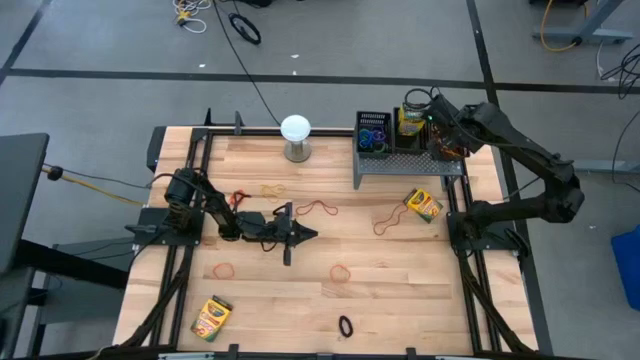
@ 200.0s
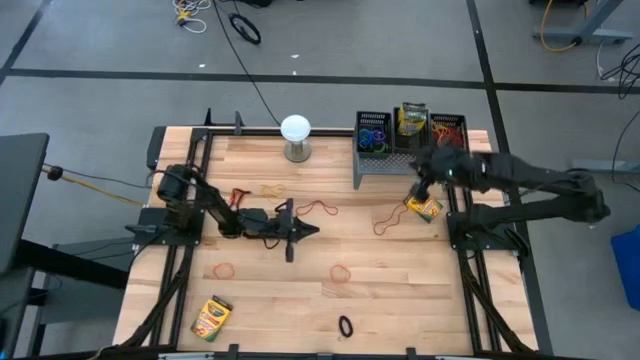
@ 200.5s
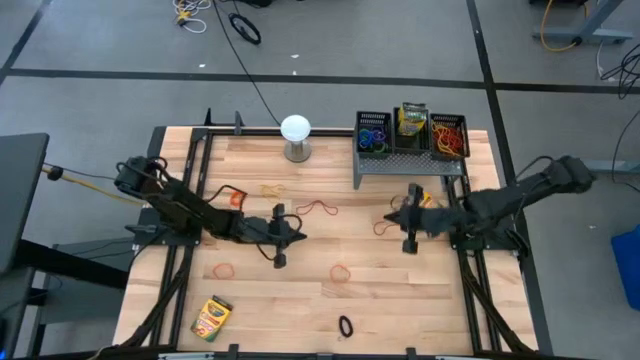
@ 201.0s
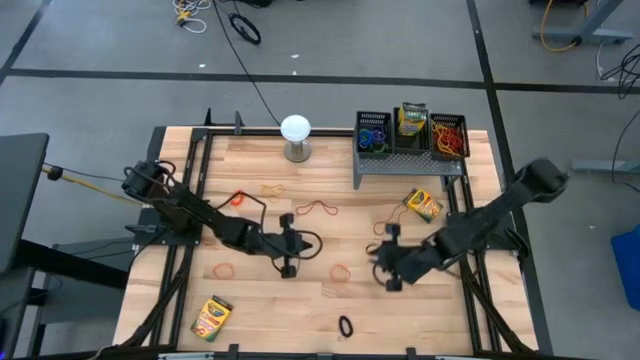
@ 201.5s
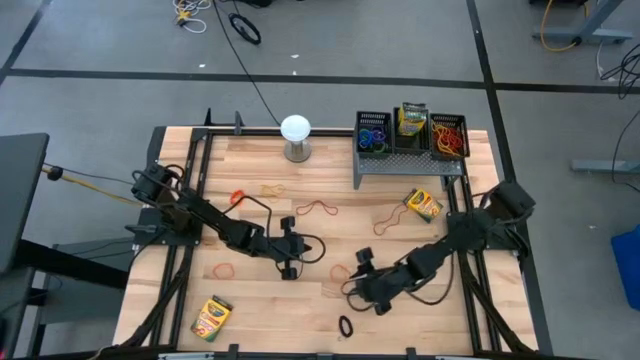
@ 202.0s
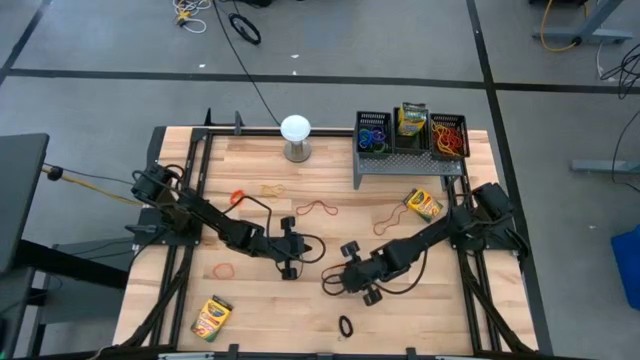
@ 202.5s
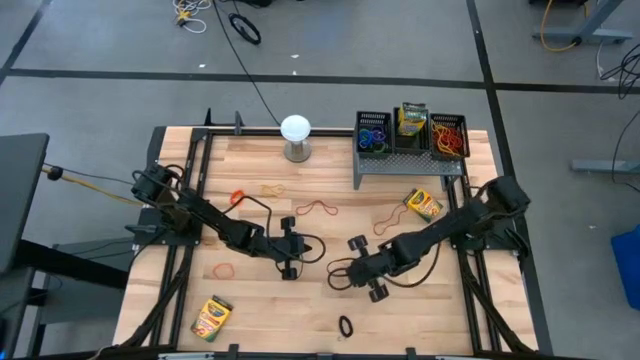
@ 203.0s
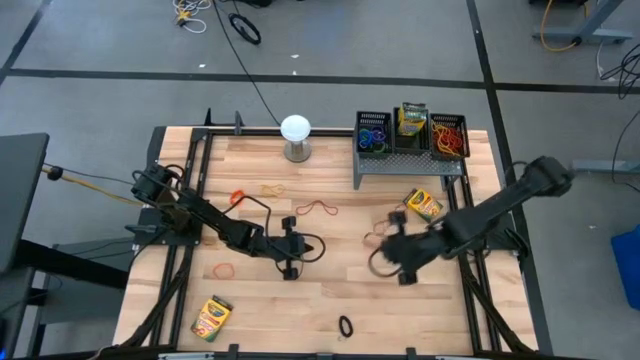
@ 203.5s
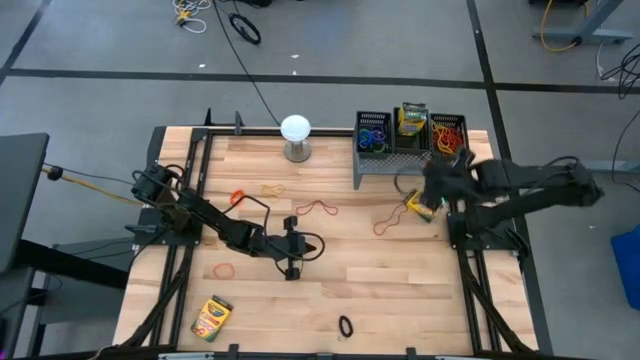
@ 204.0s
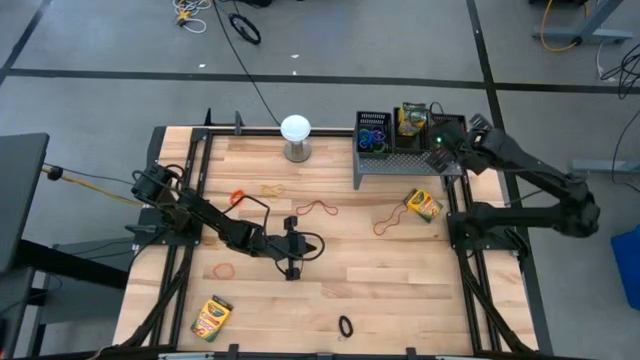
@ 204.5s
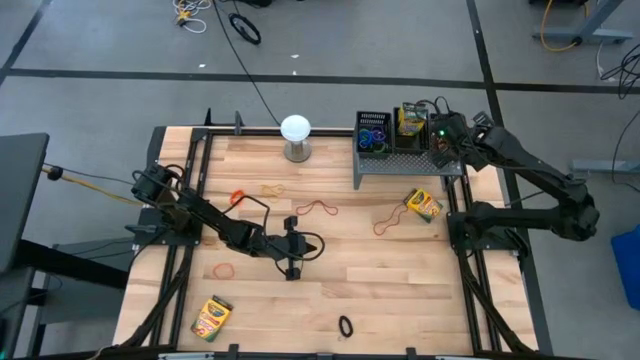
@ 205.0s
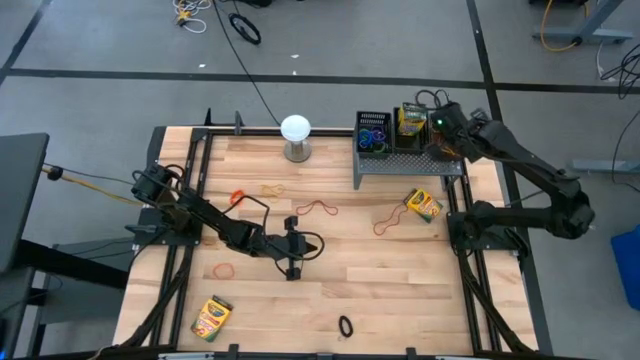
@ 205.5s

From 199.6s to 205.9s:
Task: Pick & Place Office Desk Supplies
Put the orange rubberband into the right black basket on the shelf

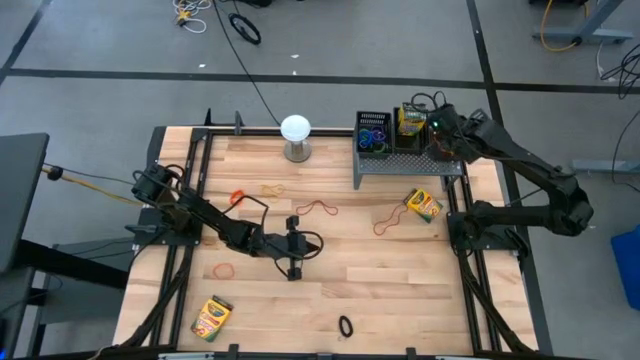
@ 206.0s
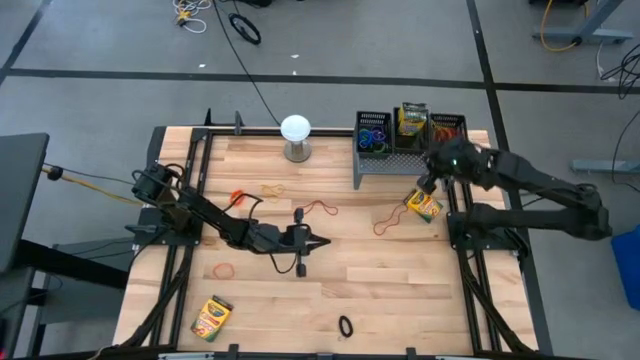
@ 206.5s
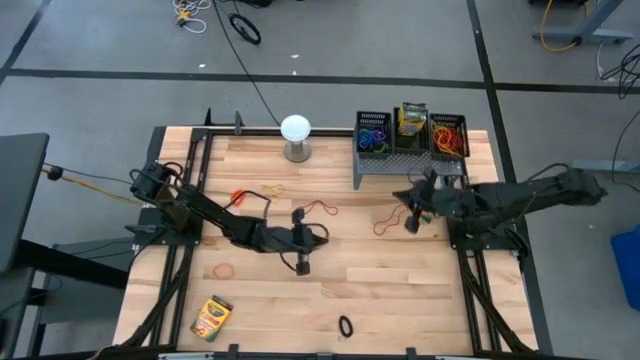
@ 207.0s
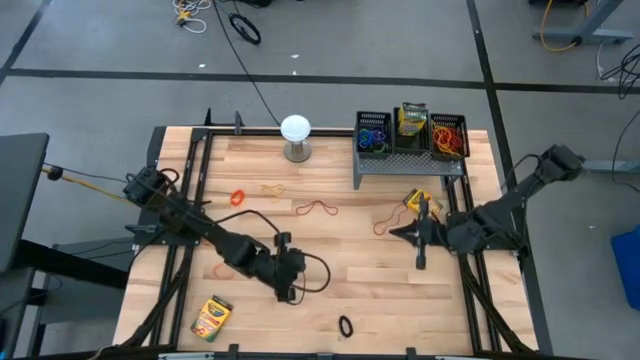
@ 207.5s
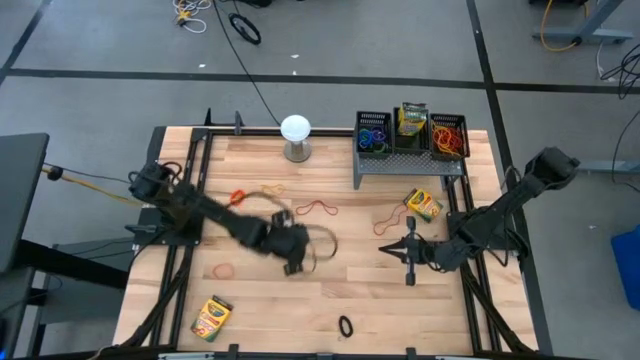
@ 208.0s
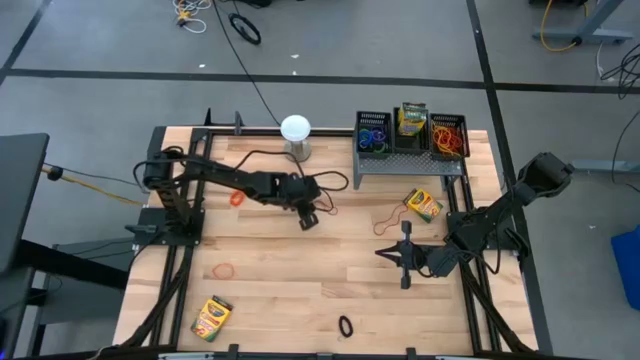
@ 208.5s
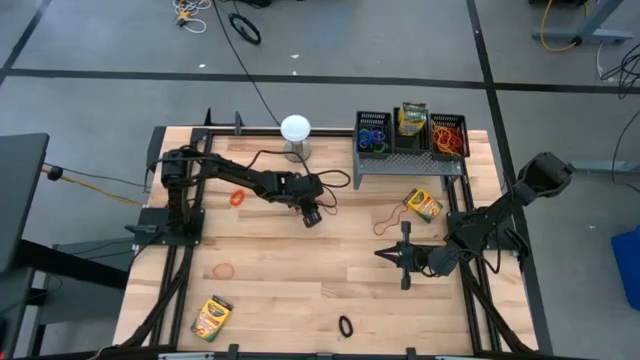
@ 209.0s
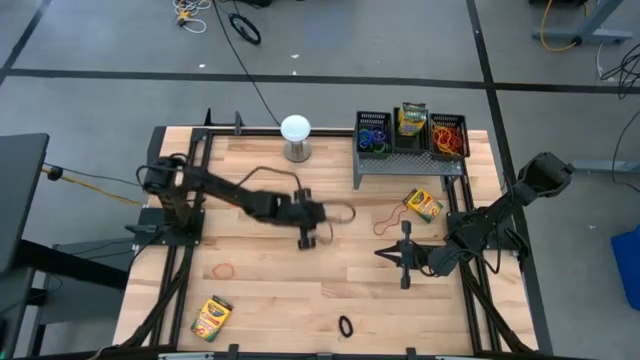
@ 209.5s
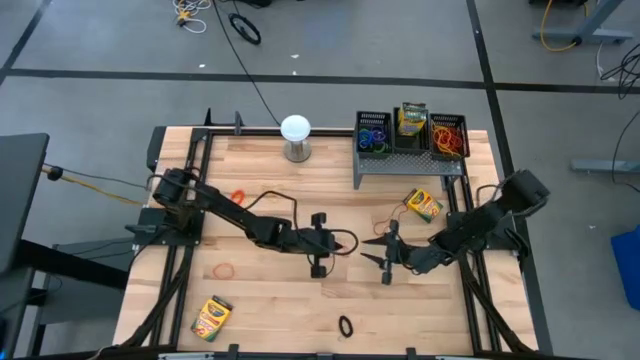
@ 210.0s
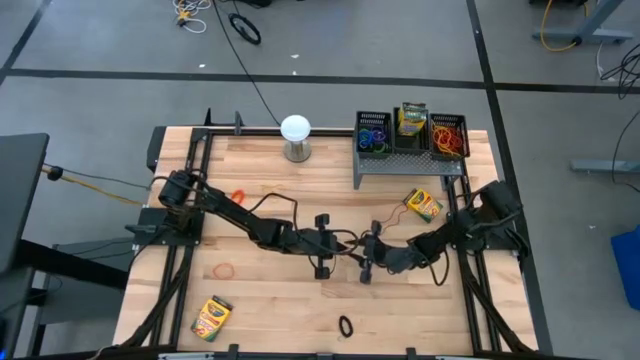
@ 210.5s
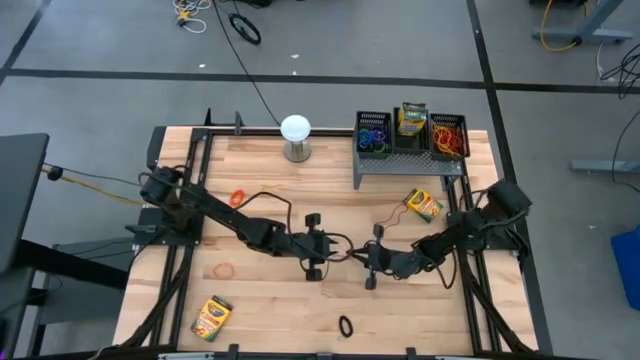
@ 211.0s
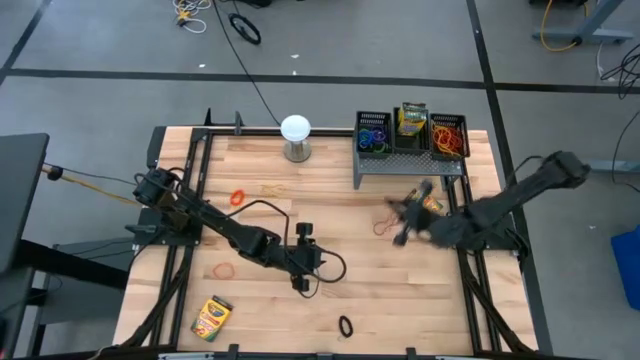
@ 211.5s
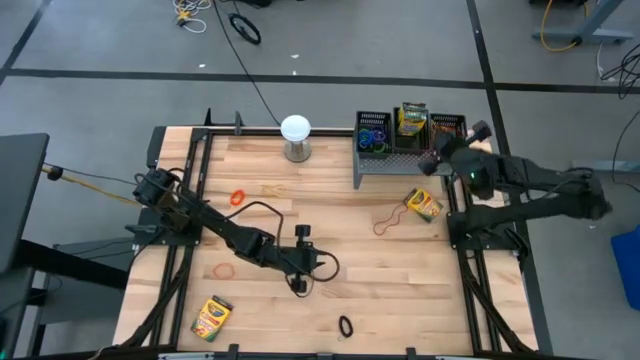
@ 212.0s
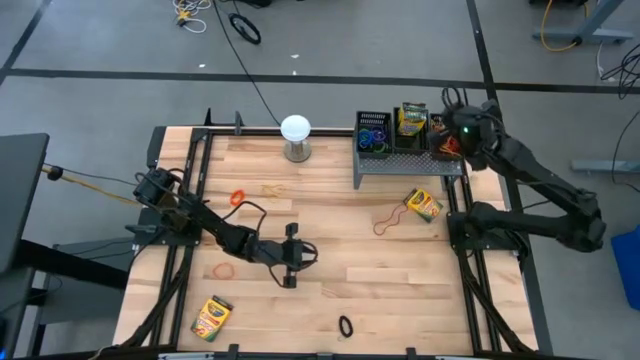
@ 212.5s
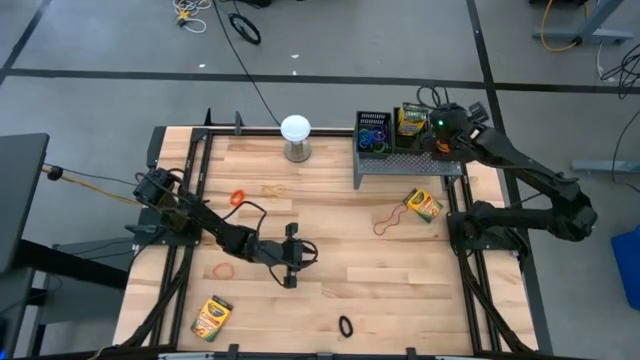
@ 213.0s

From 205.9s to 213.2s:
Put the red rubberband into the right black basket on the shelf

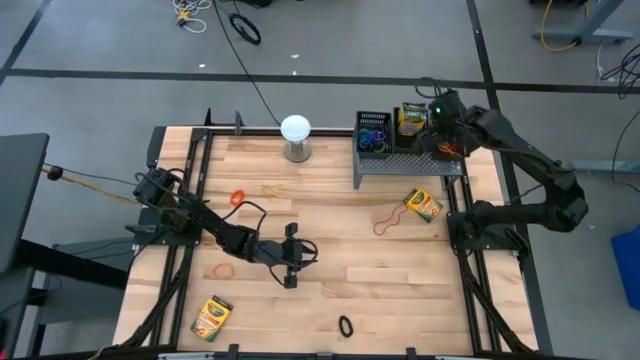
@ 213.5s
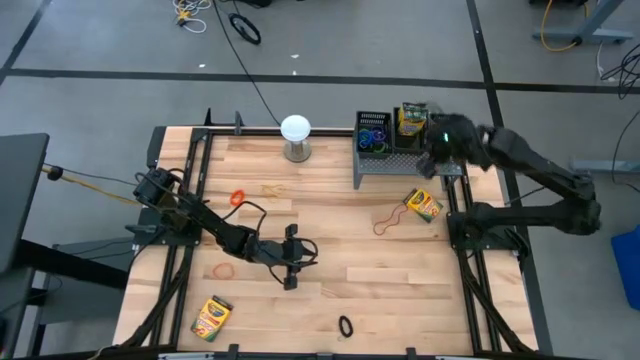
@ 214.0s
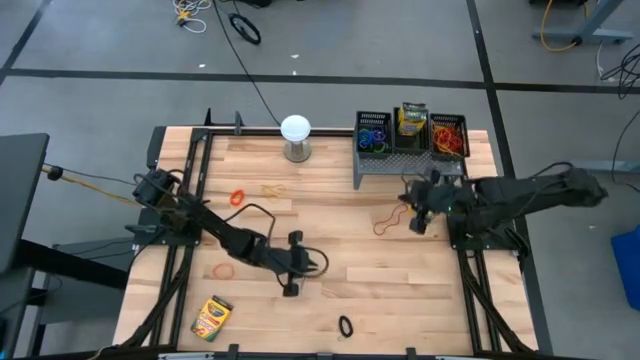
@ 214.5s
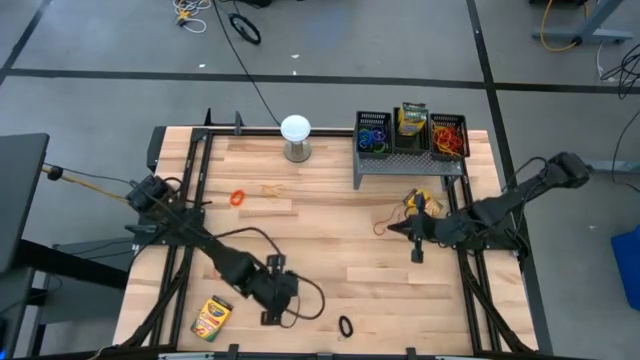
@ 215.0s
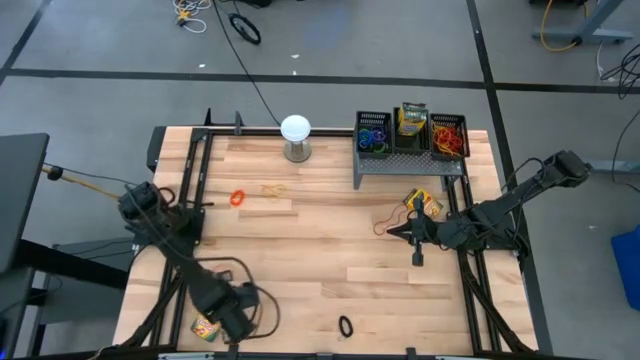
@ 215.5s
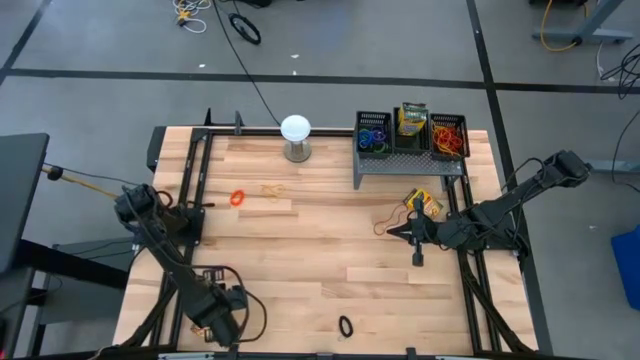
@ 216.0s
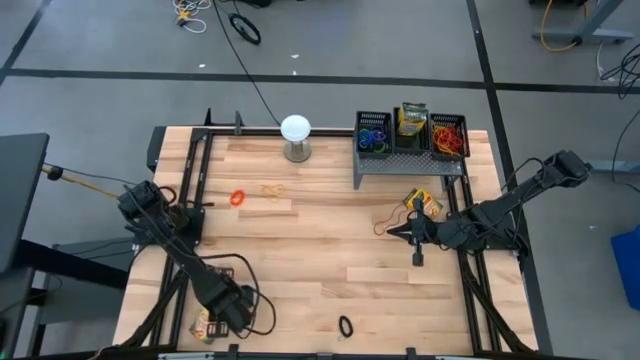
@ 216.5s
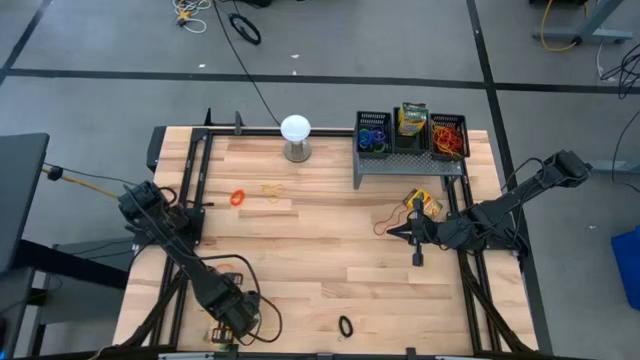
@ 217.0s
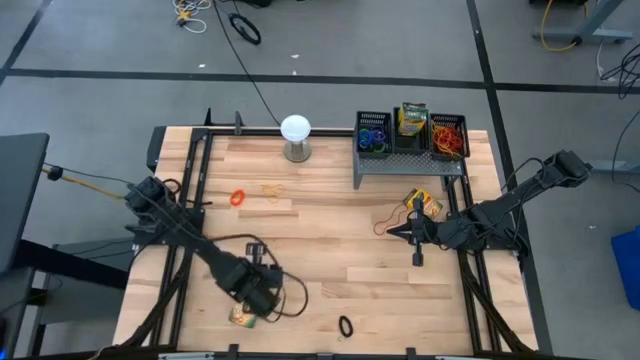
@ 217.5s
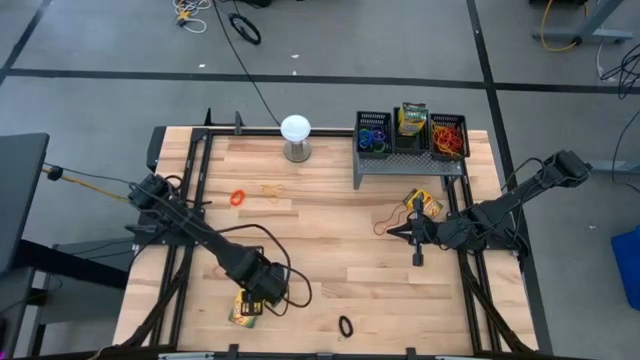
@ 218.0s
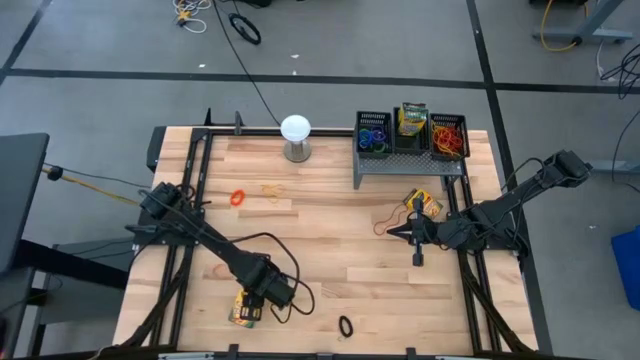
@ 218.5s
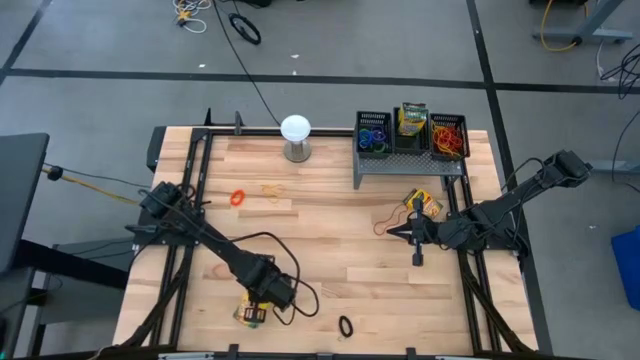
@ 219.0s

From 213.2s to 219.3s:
Put the yellow crayon box into the middle black basket on the shelf

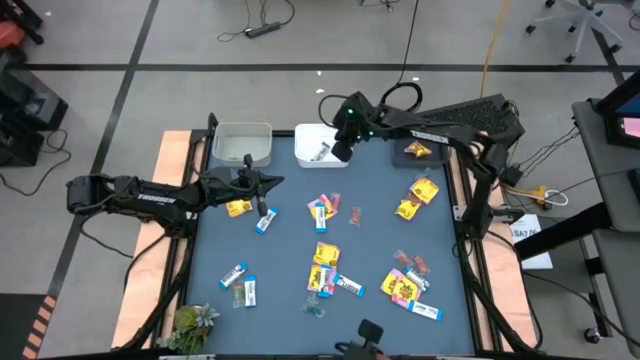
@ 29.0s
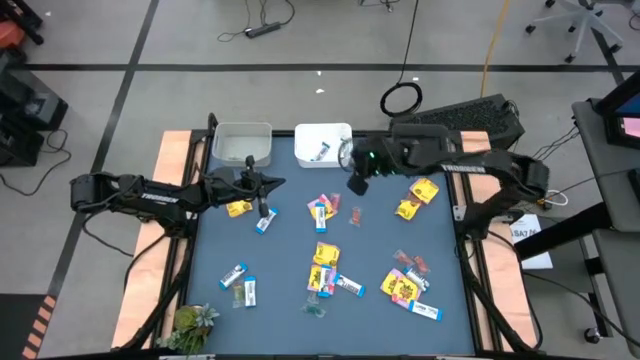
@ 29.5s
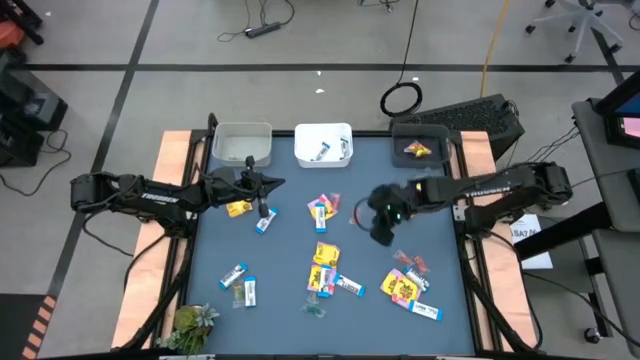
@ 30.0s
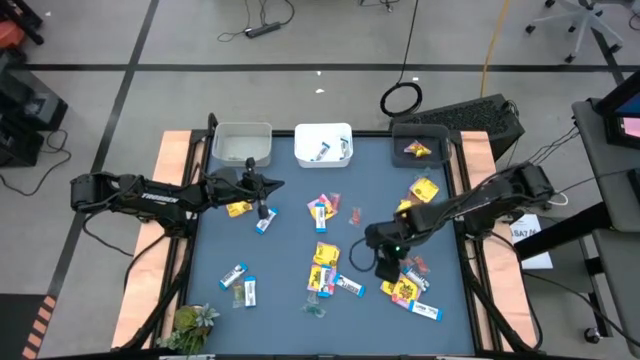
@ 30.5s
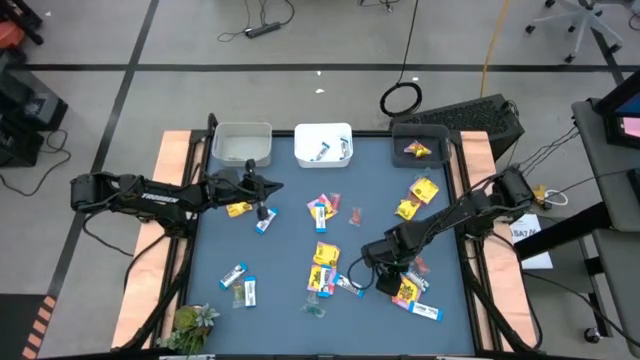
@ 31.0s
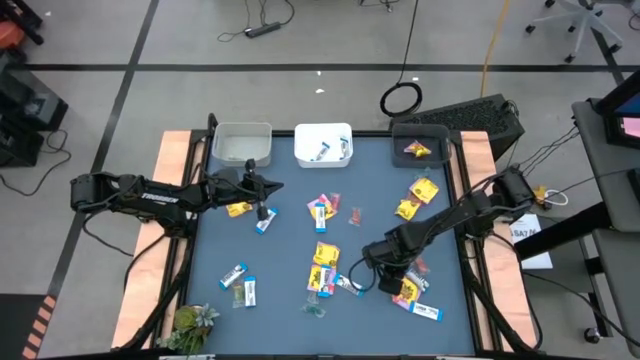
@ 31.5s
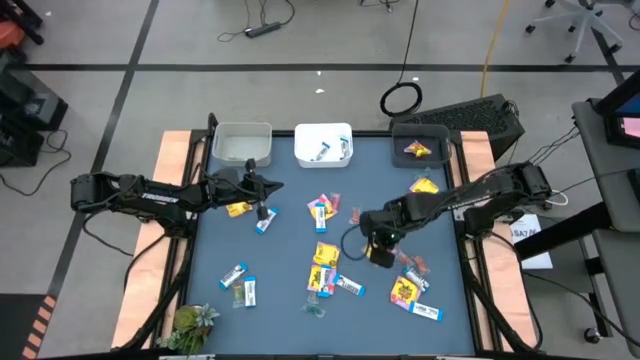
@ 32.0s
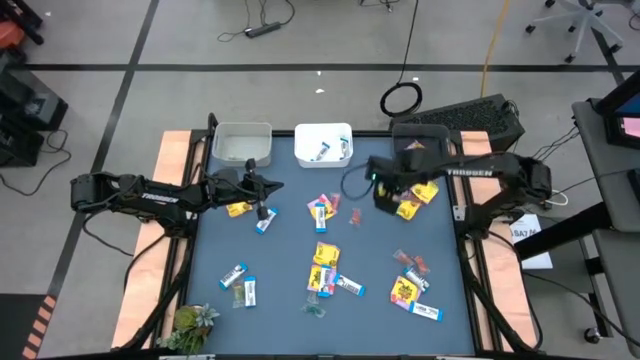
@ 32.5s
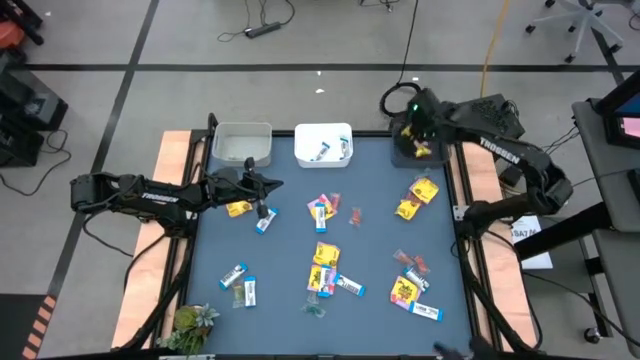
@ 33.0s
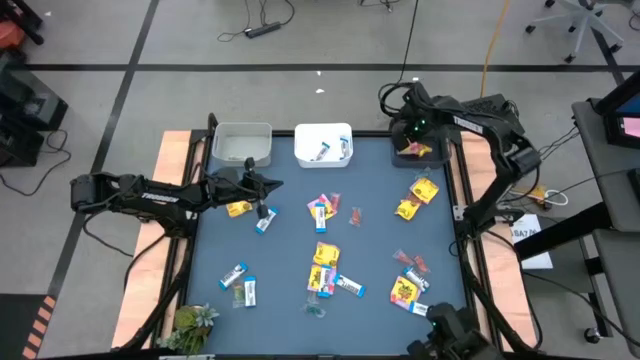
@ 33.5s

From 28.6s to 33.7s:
Task: Sort candy
Put the yellow candy pack into the black bin
